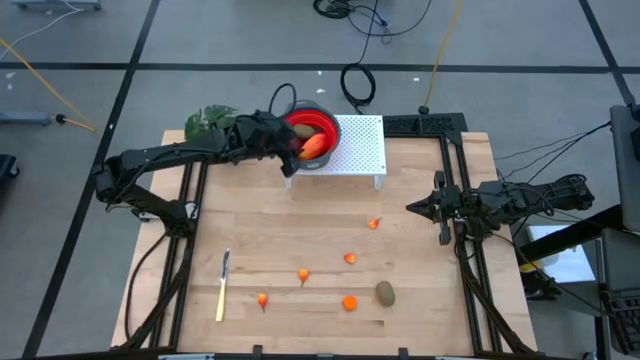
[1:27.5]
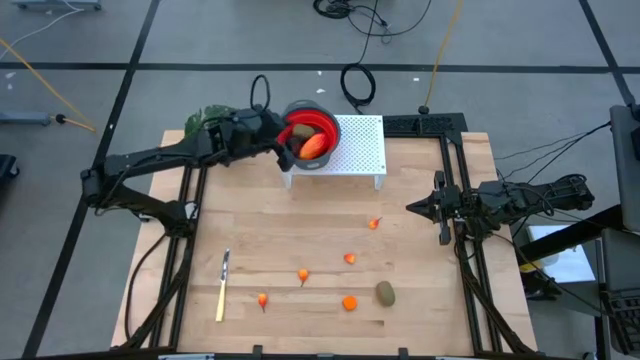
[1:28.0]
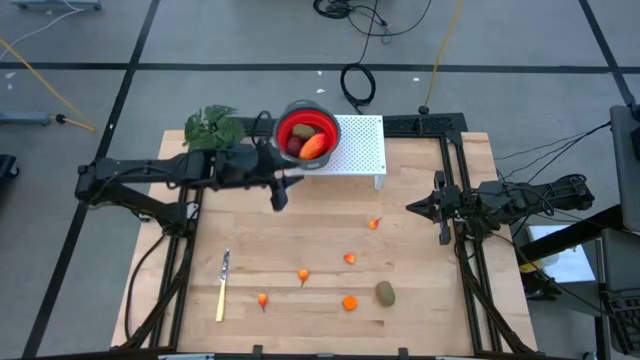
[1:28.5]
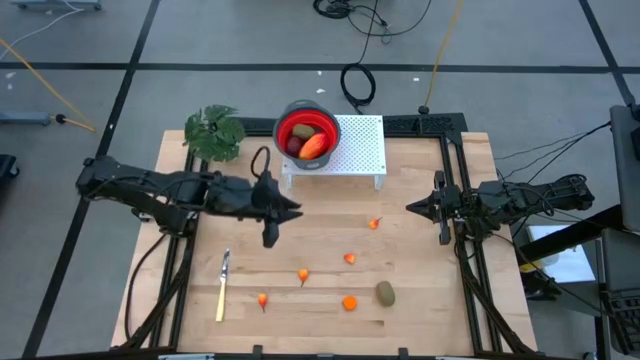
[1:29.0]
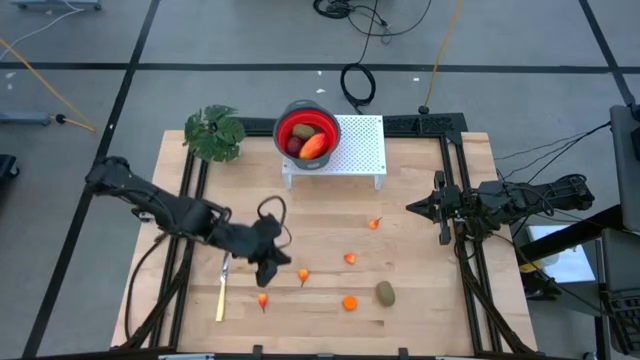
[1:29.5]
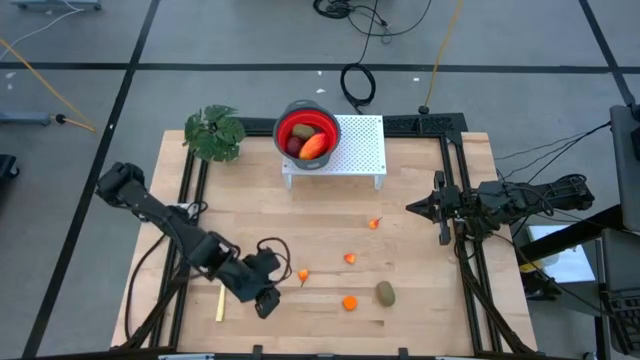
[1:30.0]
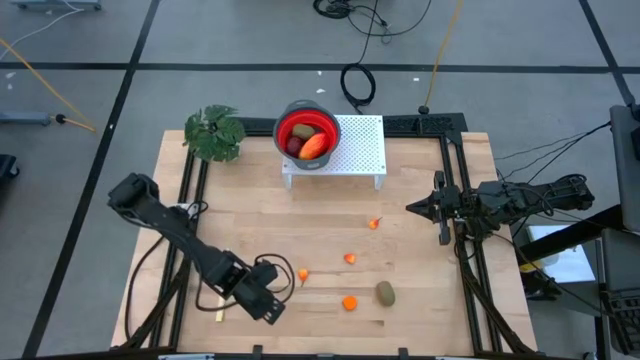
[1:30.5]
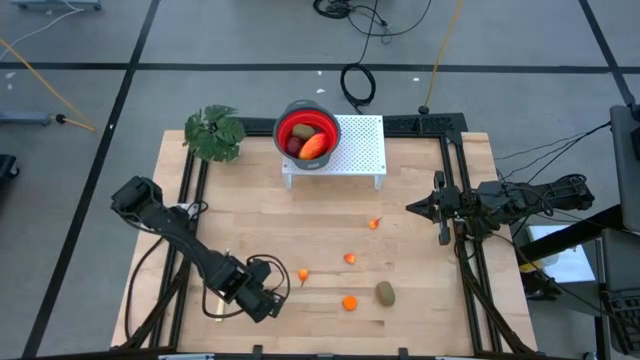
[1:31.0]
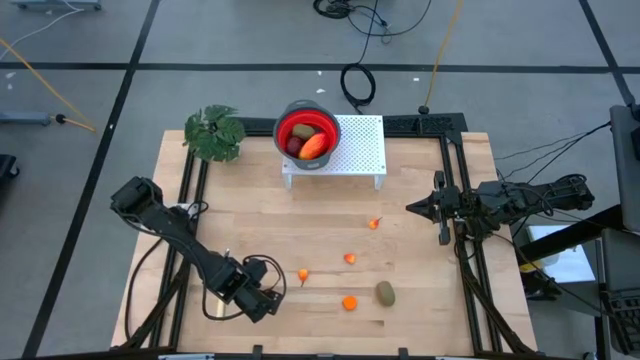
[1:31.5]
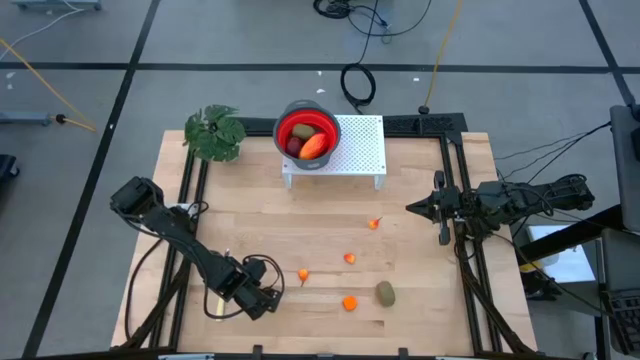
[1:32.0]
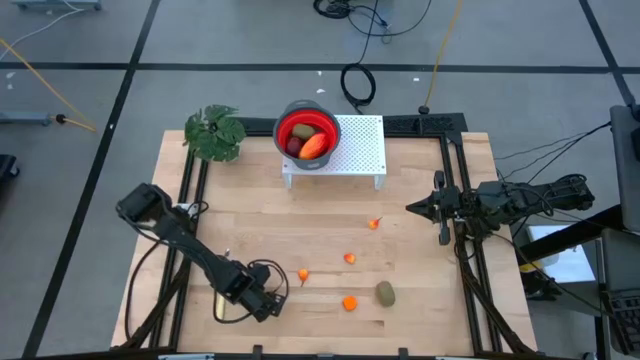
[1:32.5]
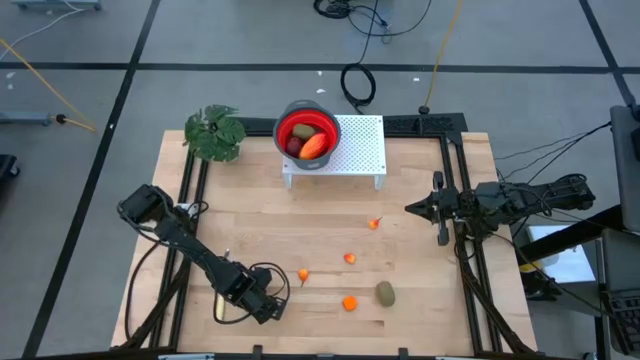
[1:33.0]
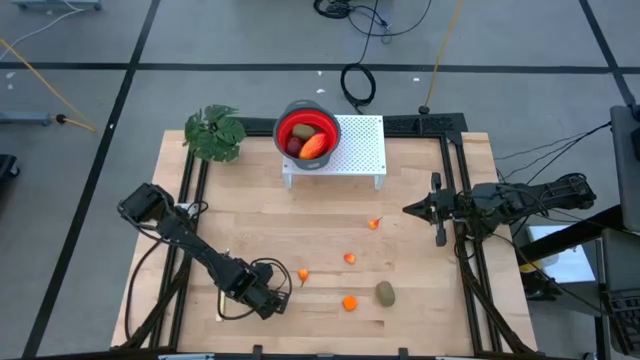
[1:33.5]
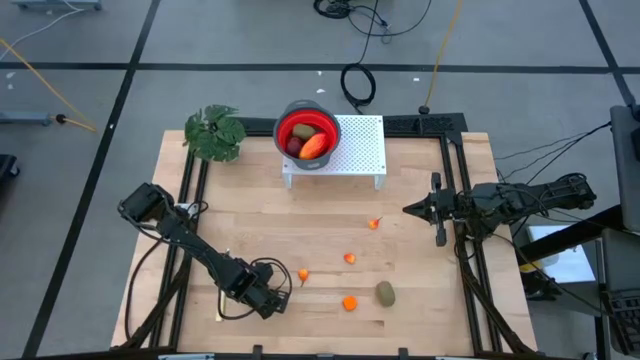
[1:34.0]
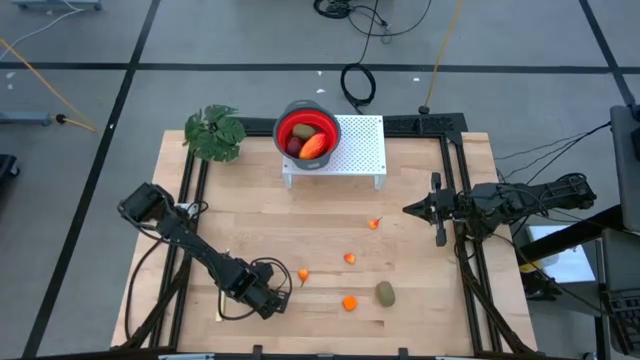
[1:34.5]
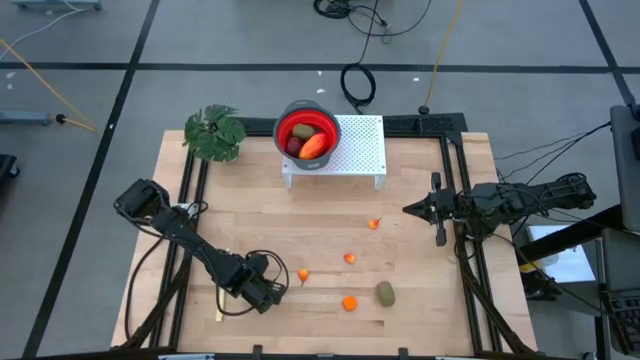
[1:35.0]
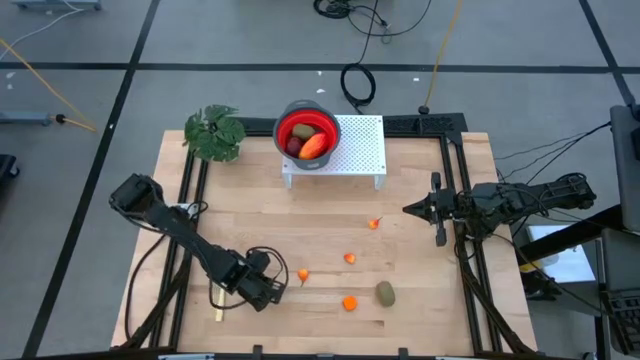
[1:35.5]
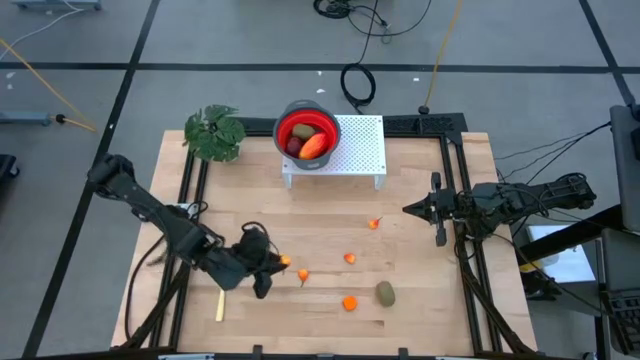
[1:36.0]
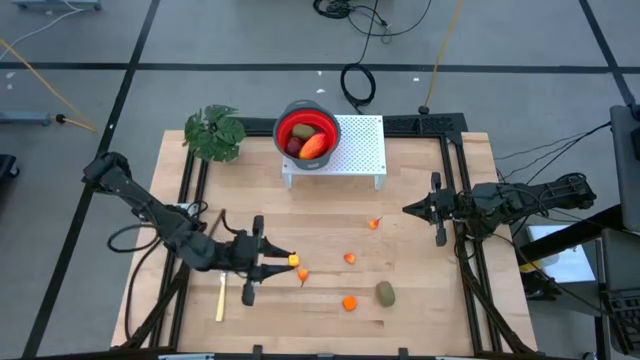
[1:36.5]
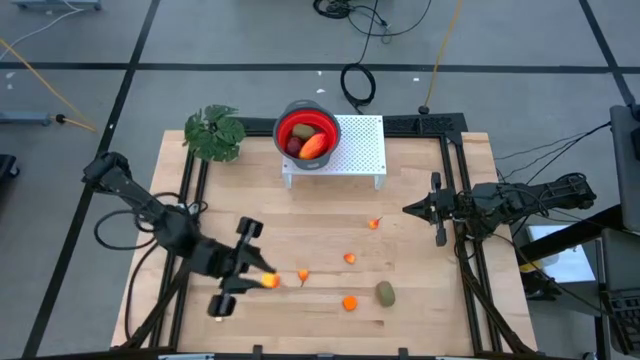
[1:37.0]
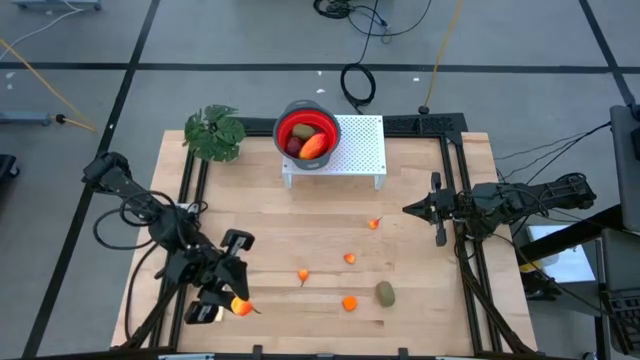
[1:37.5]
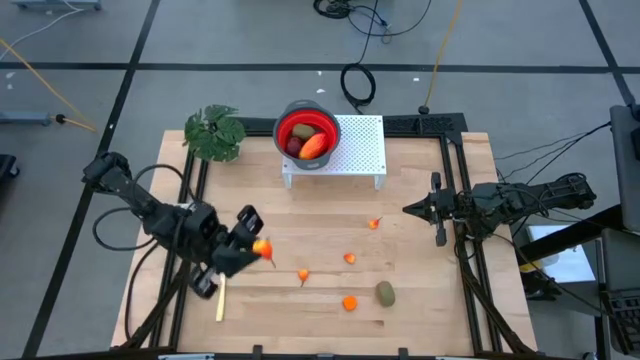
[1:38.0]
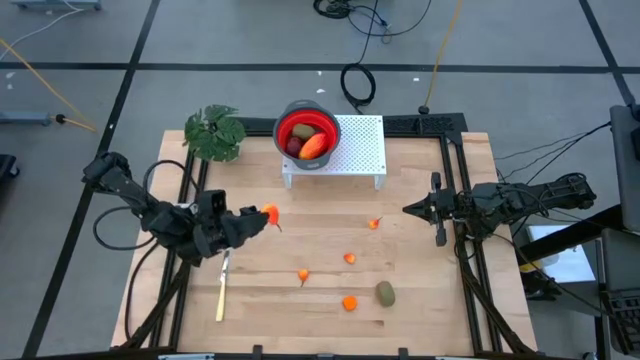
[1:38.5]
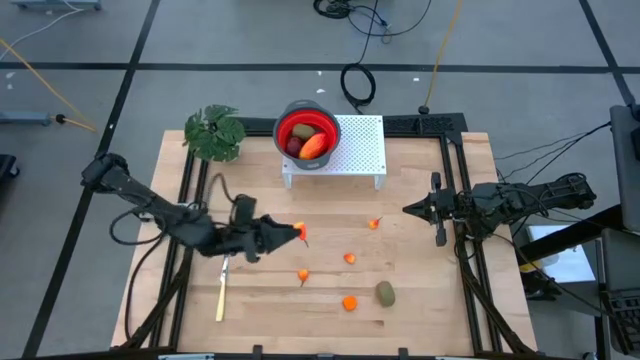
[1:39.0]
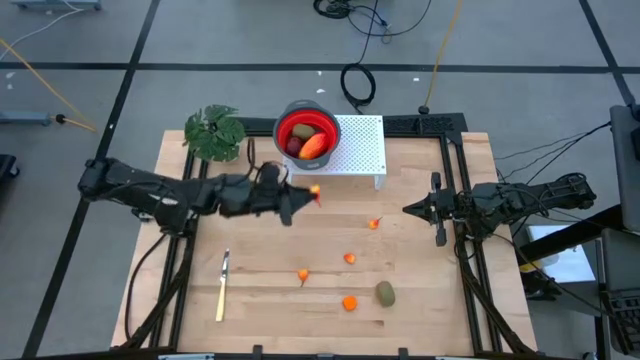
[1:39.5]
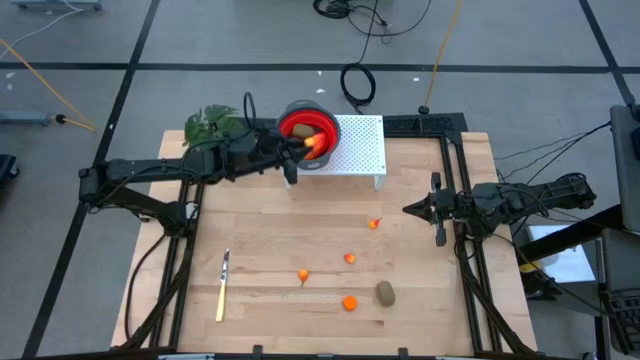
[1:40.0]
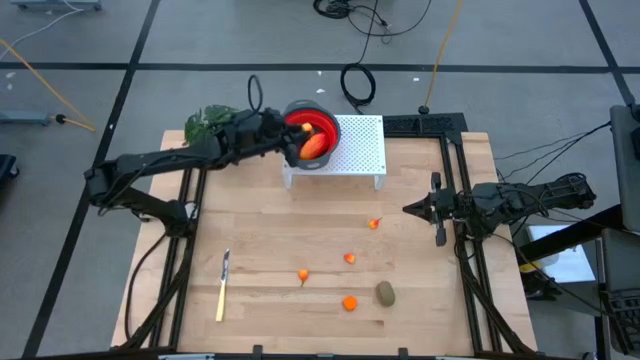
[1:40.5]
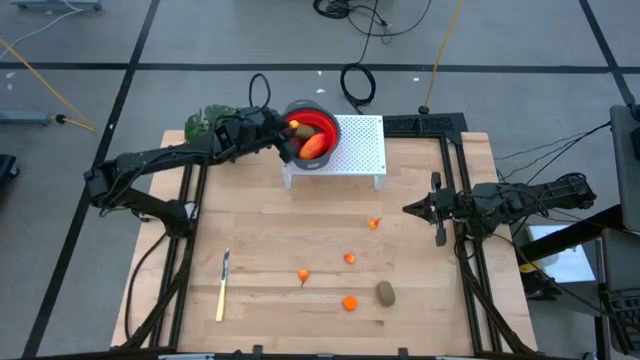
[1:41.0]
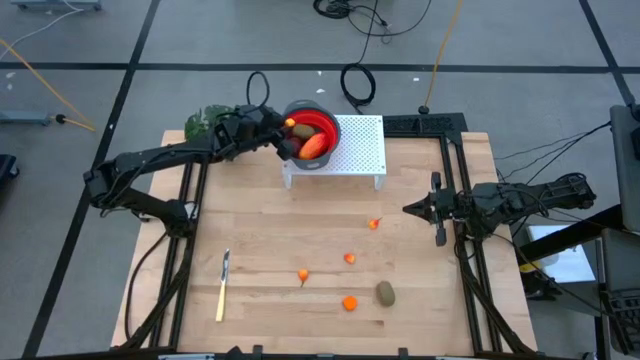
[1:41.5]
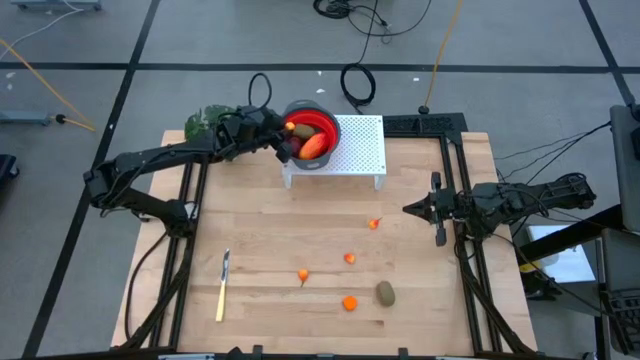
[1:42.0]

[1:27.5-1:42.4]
Task: Pick & Place Fruit
Put the pear into the red strainer bowl on the shelf

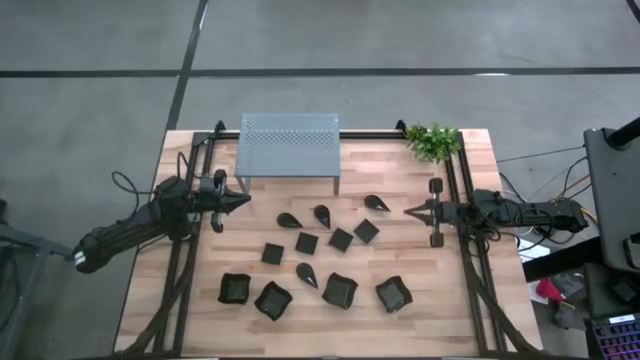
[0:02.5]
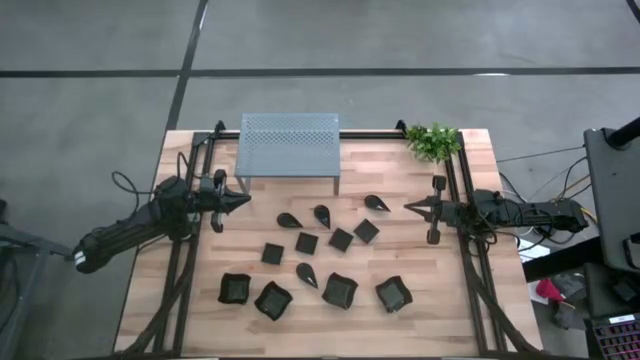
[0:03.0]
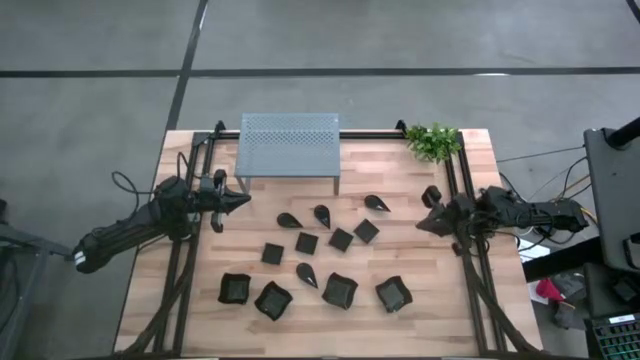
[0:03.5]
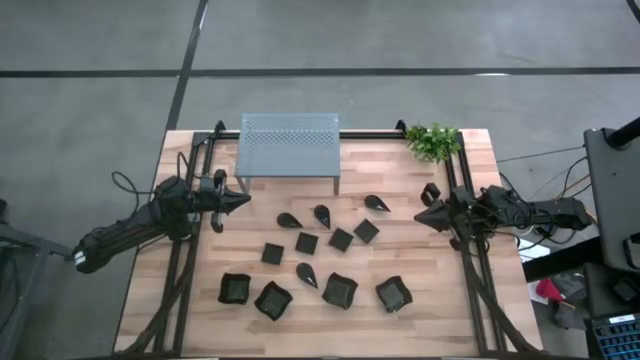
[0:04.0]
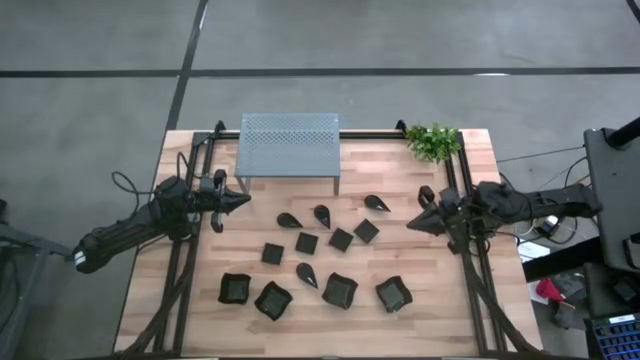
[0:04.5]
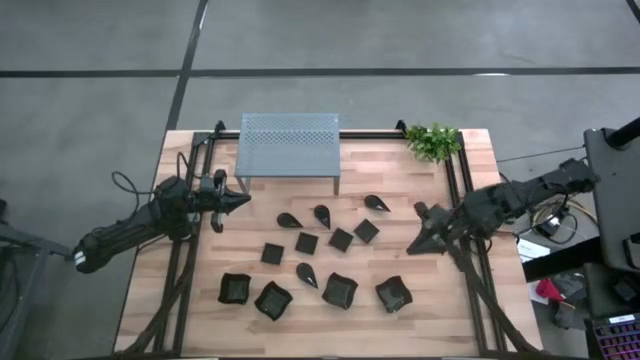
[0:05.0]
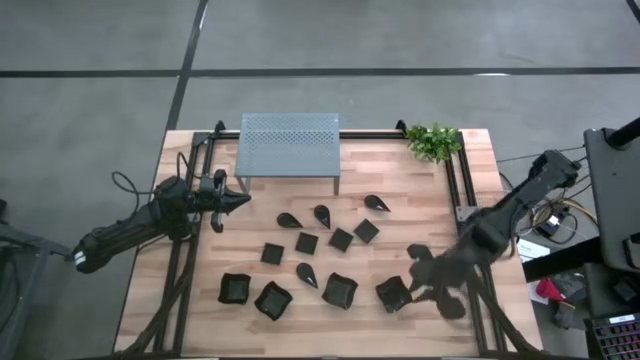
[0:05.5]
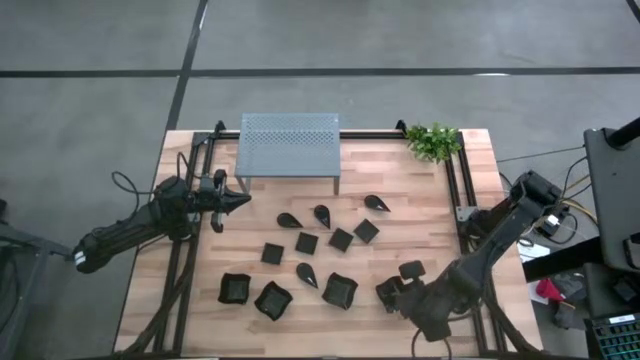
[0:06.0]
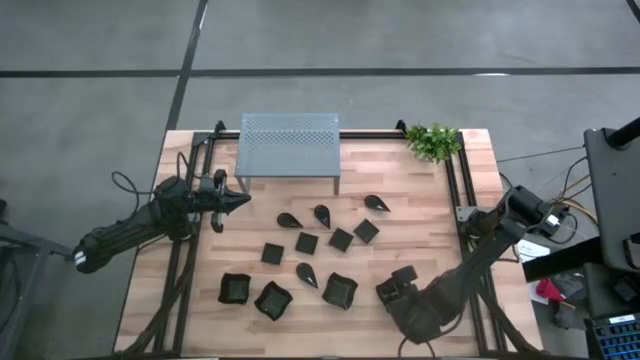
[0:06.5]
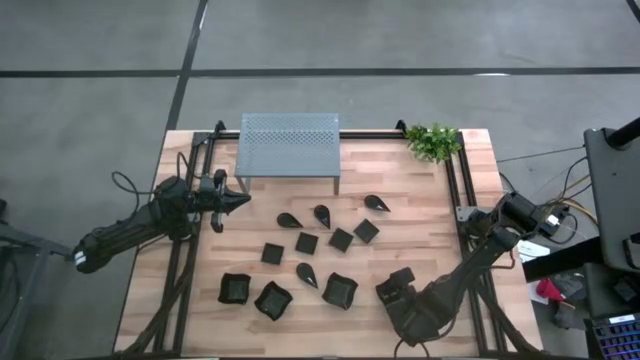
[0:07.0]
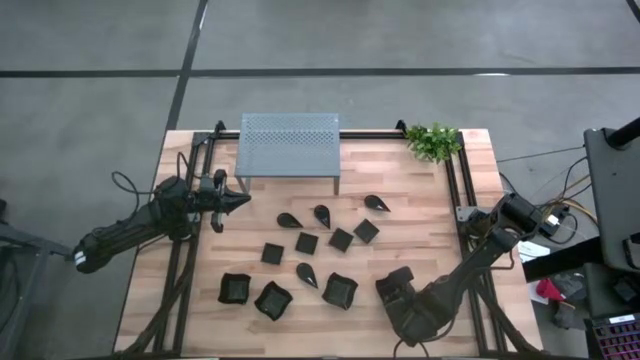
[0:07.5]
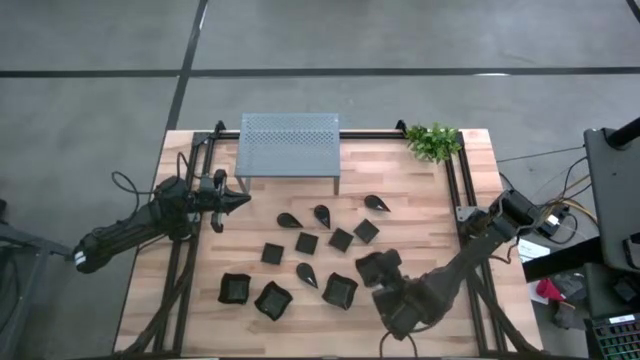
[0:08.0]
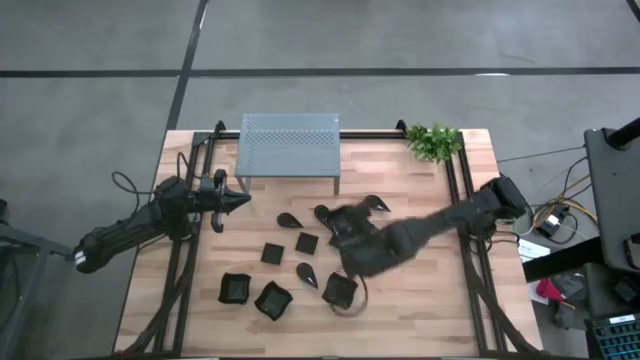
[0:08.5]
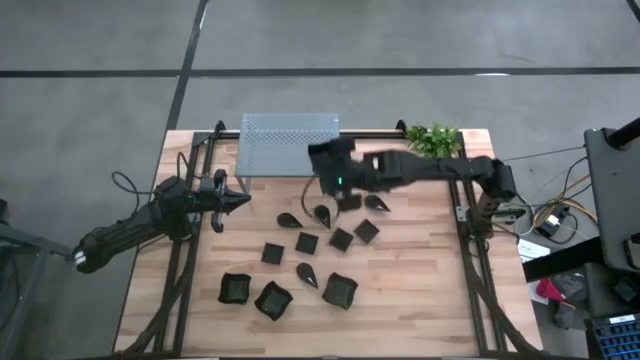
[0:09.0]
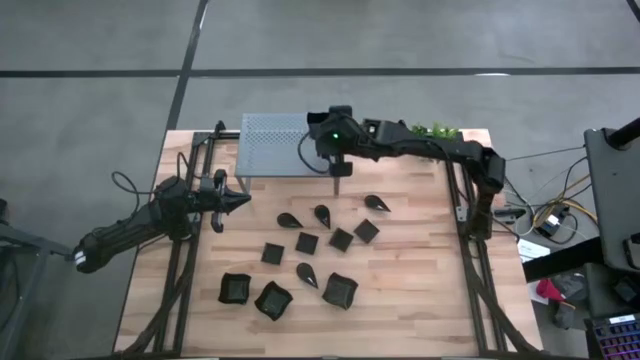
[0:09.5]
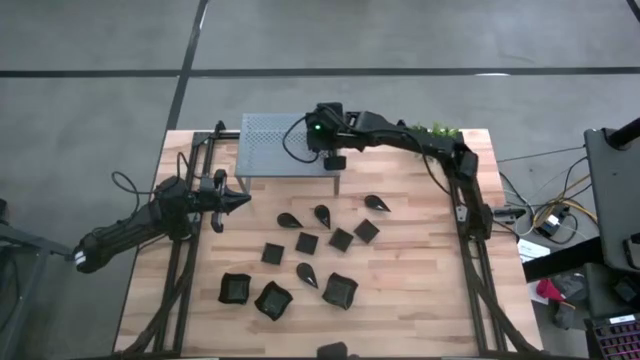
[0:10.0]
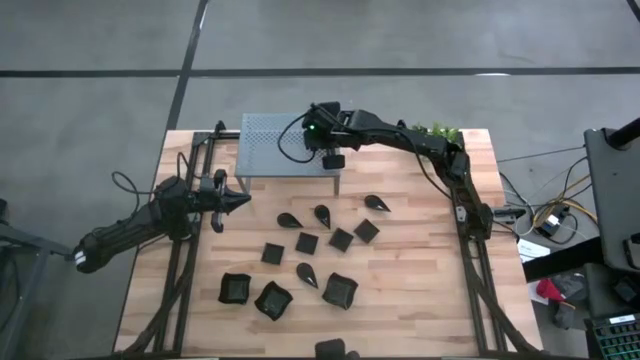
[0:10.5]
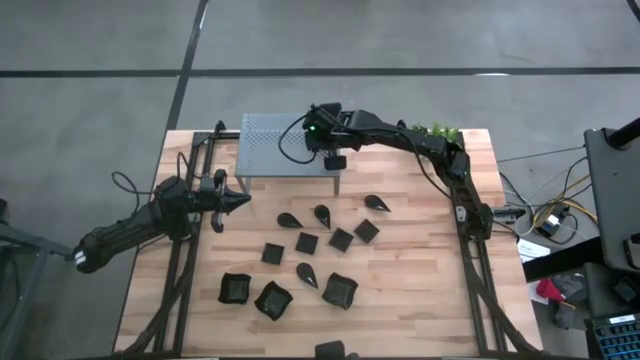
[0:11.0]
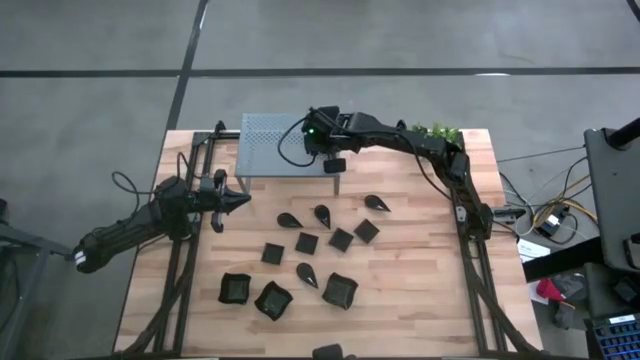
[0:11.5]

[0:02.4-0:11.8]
Task: Pick & Place Mini shaped plates
Put the black distorted square plate on the shelf
